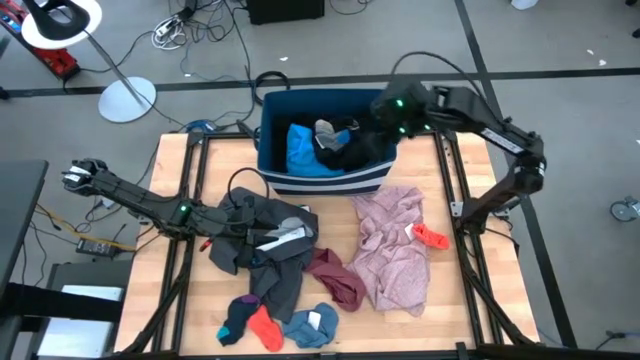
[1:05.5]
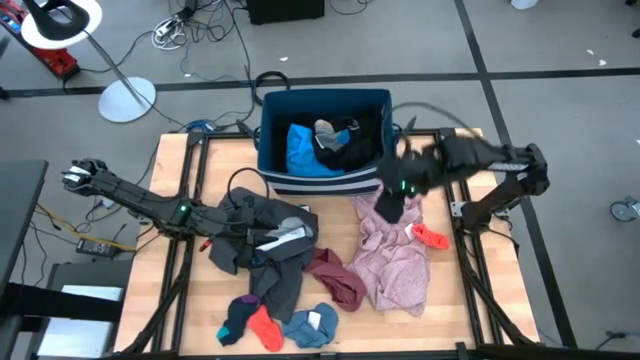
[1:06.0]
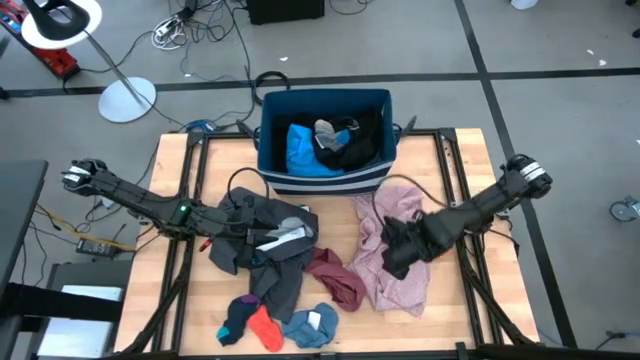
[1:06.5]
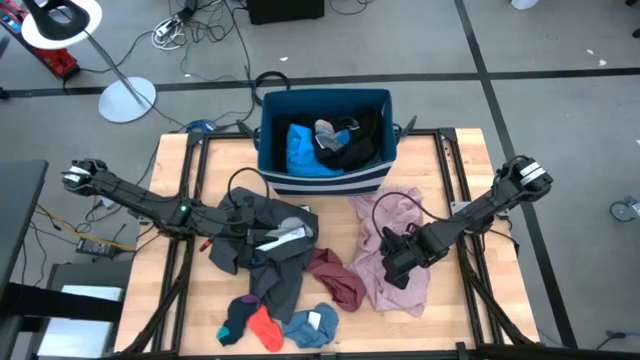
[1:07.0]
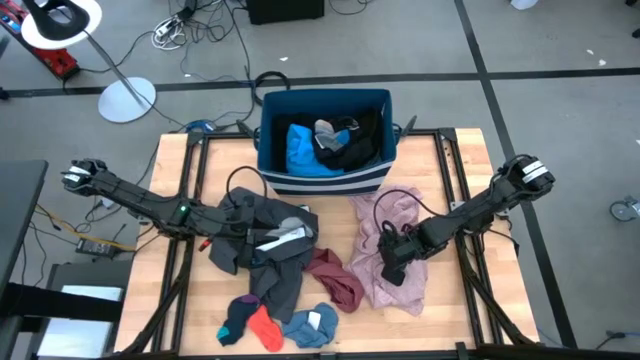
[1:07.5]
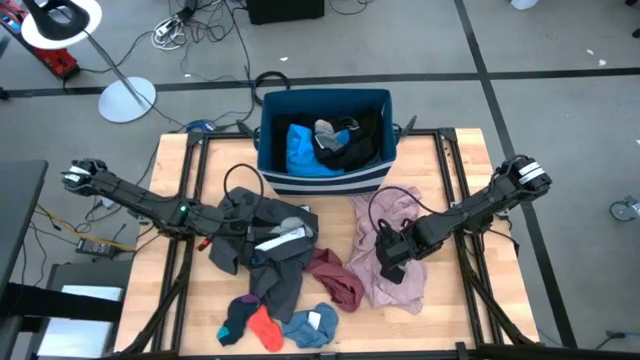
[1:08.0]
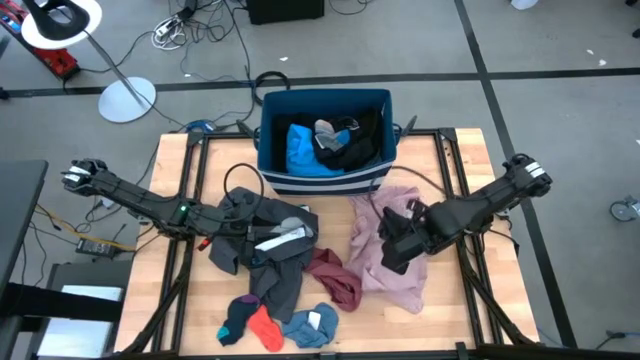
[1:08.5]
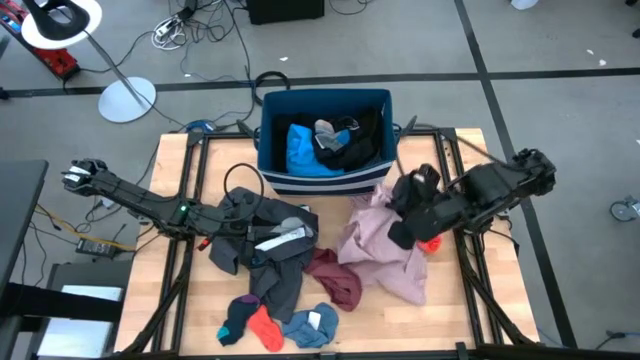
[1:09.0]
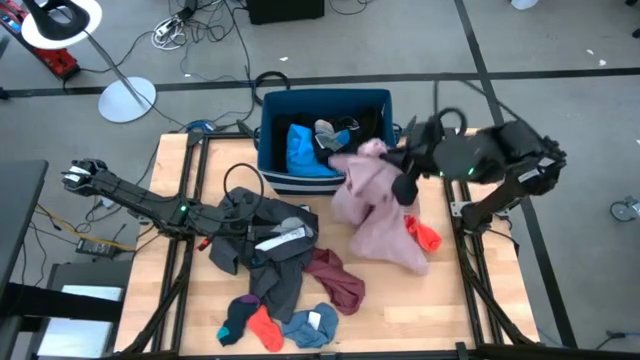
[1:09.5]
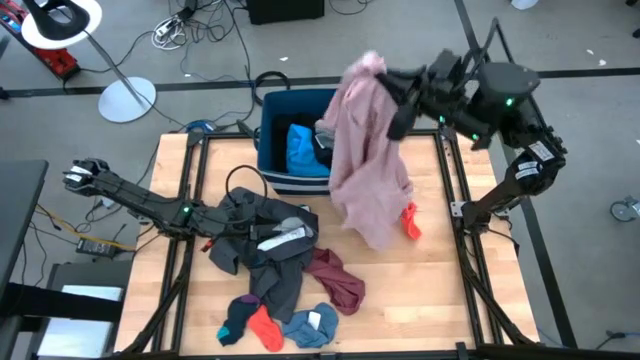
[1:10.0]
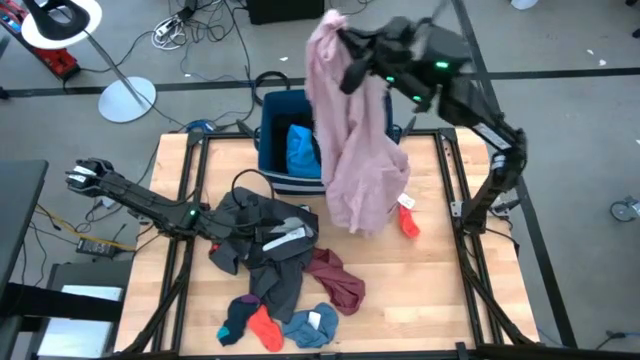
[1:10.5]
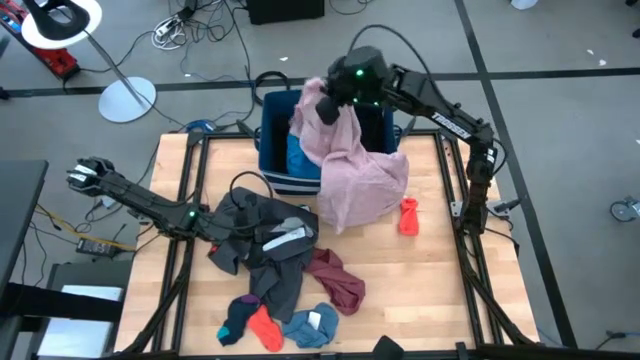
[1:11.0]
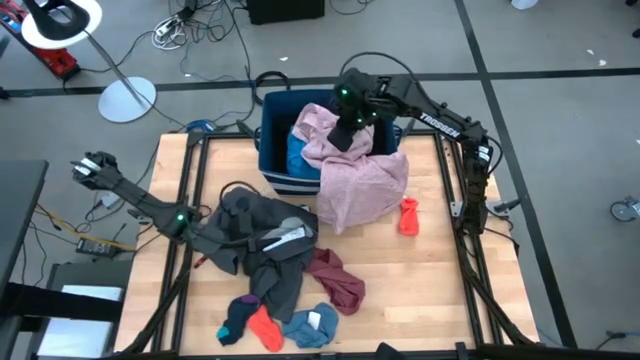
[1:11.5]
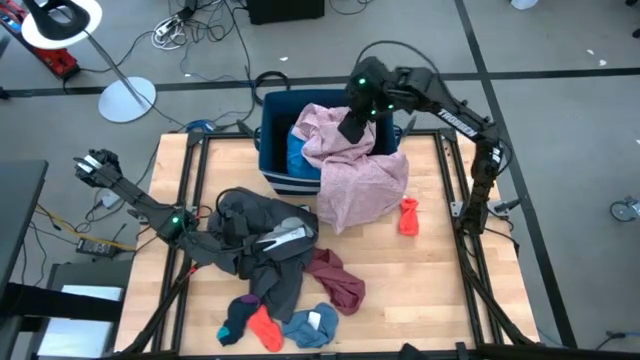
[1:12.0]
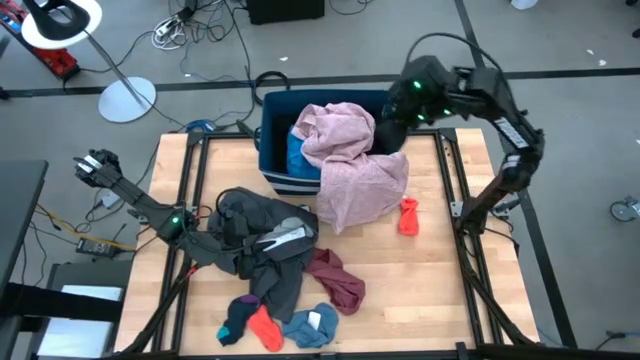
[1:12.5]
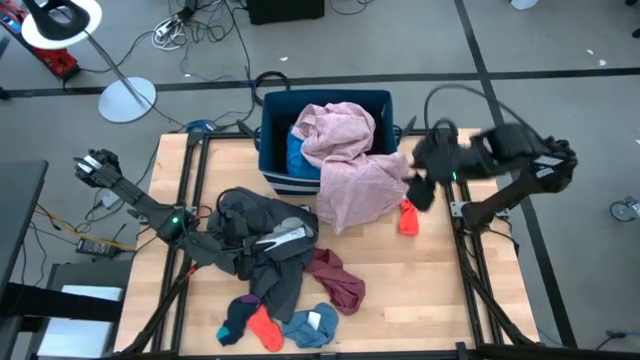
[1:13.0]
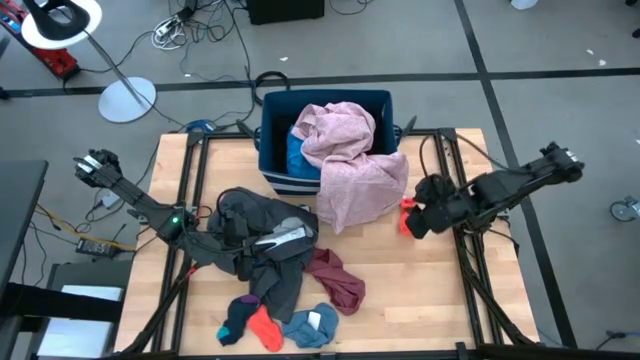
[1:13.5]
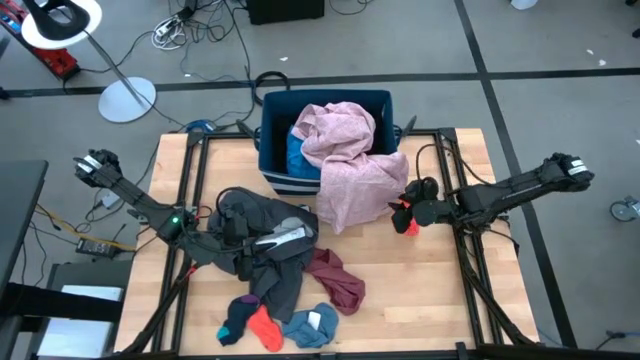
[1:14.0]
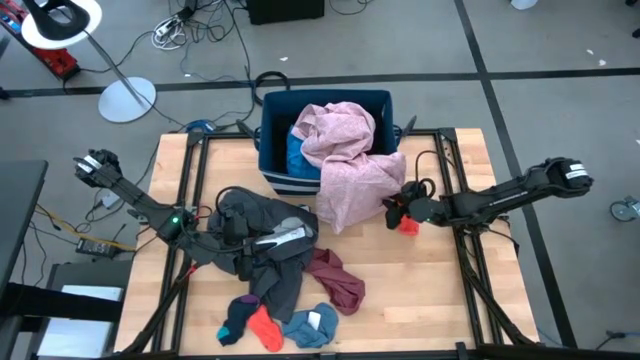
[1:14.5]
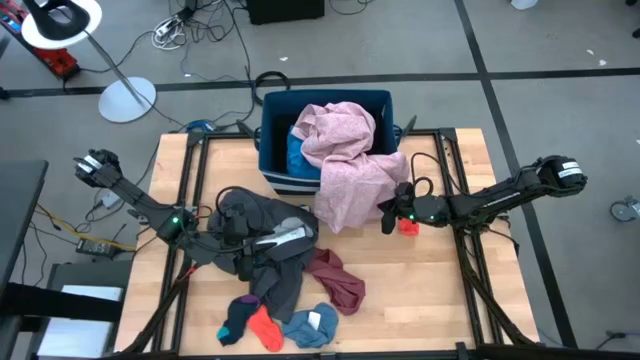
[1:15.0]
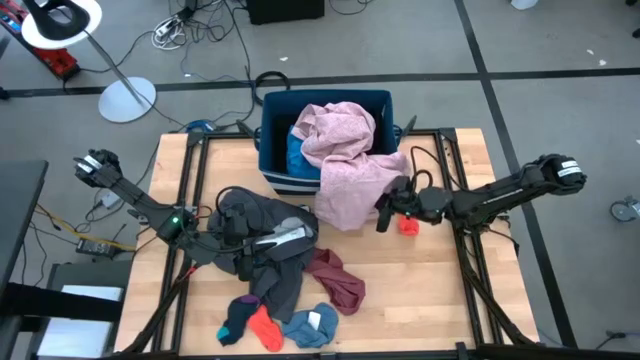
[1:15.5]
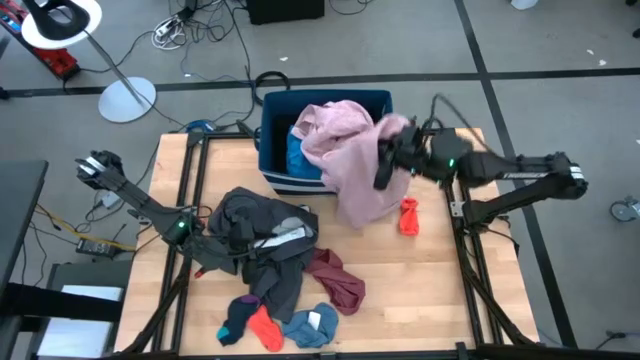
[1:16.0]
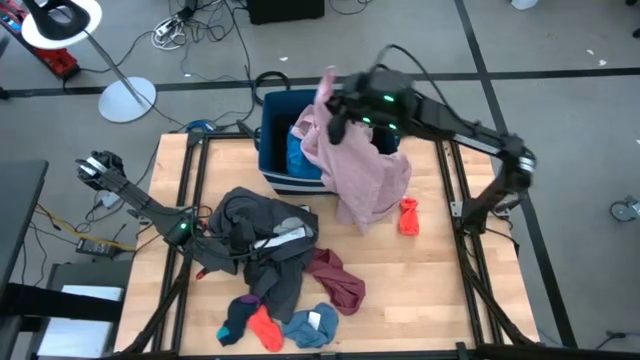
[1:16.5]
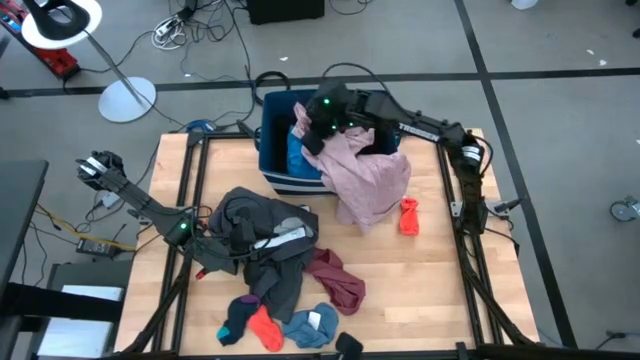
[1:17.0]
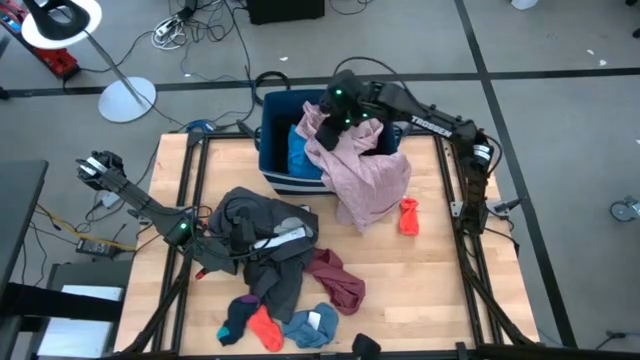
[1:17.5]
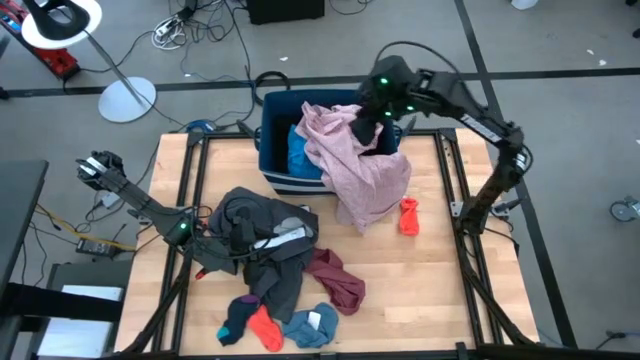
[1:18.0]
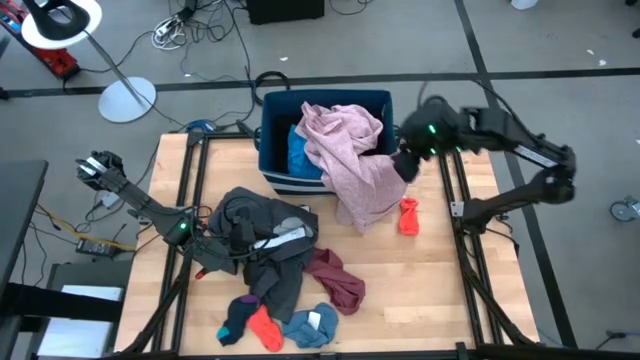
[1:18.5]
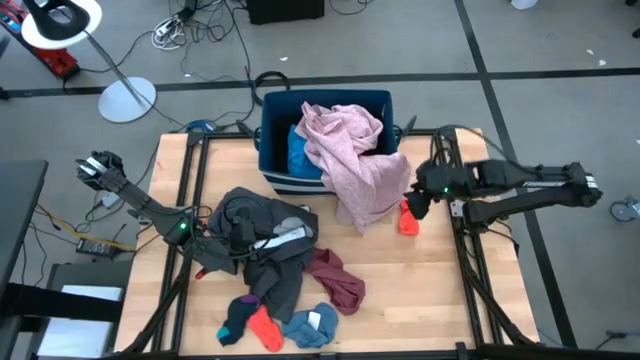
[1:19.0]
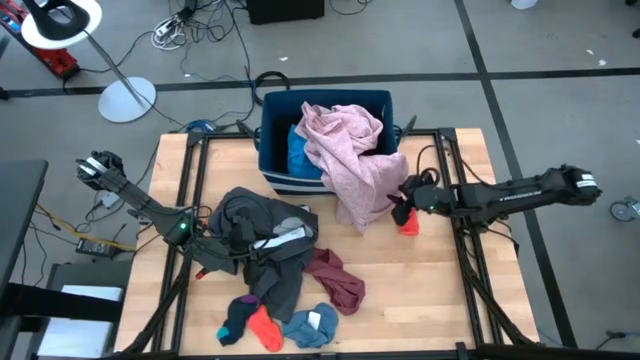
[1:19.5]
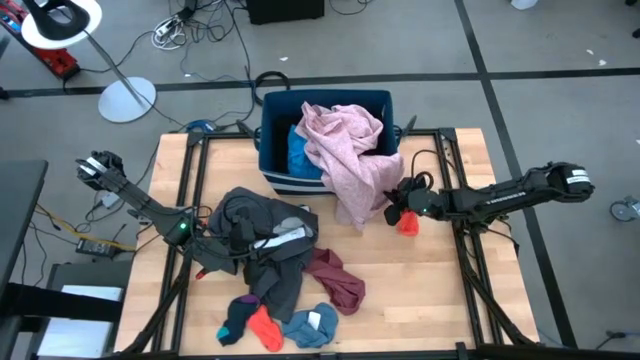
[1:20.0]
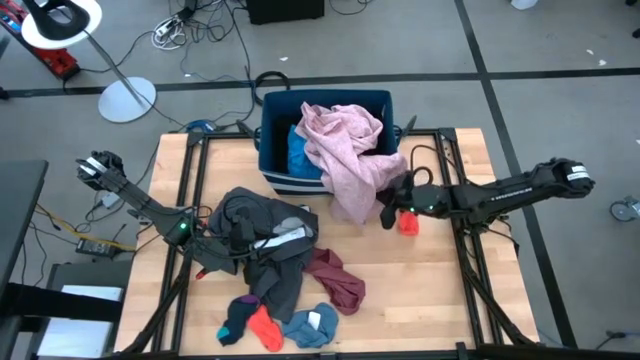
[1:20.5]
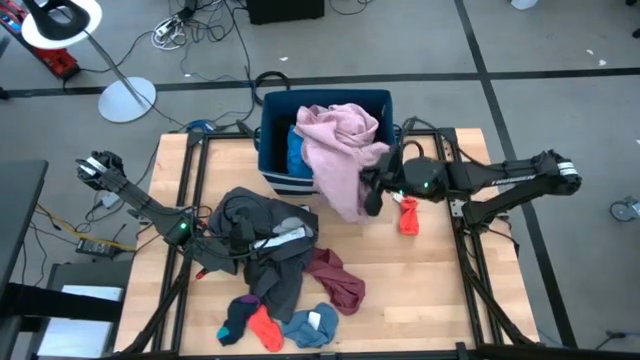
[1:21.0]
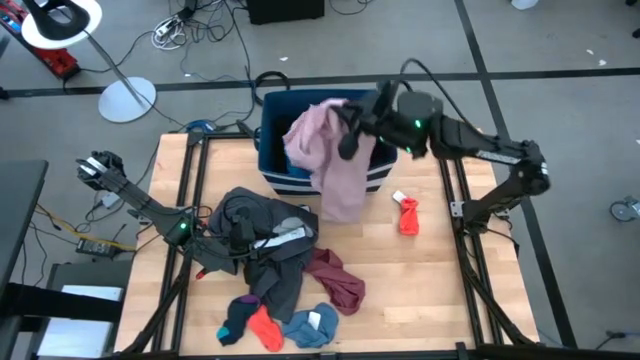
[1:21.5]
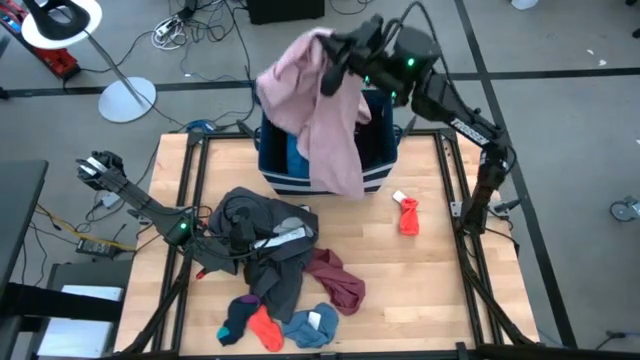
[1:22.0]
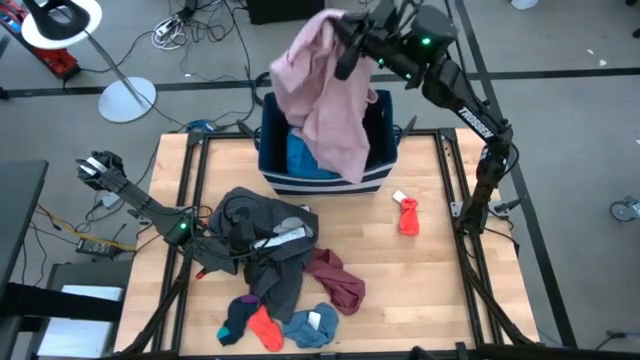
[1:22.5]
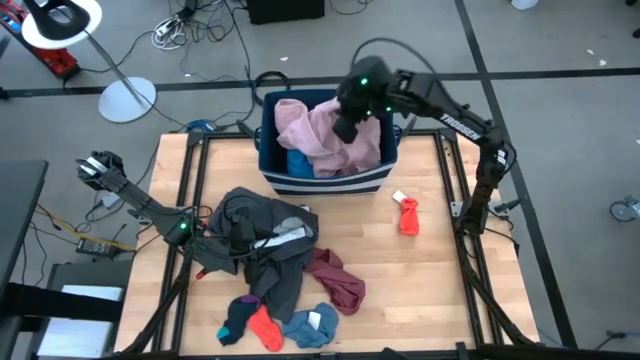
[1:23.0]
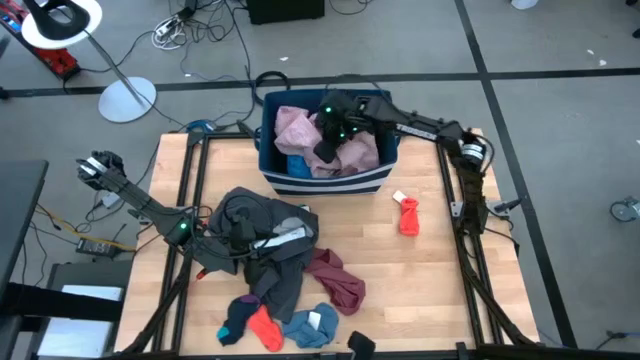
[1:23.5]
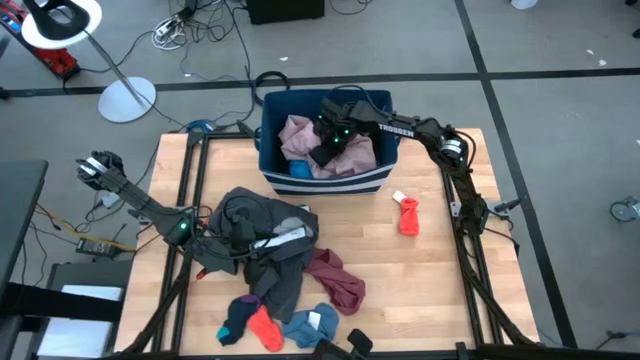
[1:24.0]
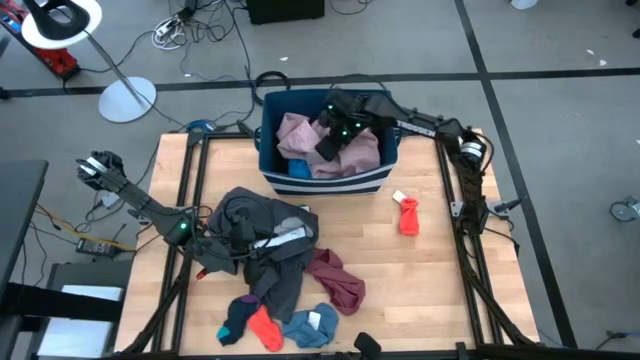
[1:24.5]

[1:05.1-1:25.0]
Task: Sort clothes
Put the pink polo into the laundry bin

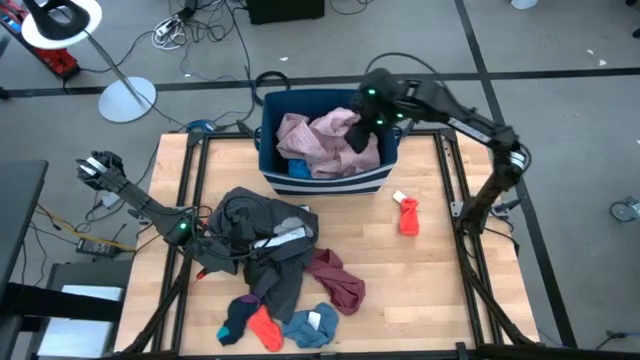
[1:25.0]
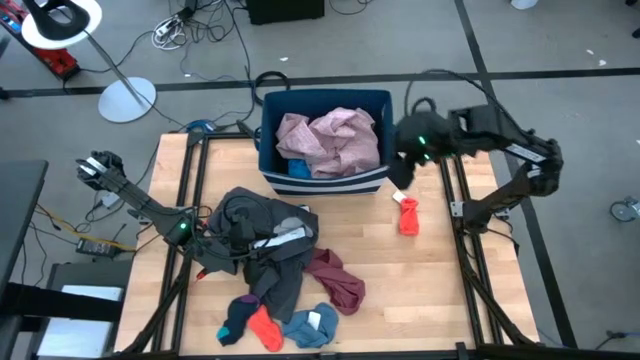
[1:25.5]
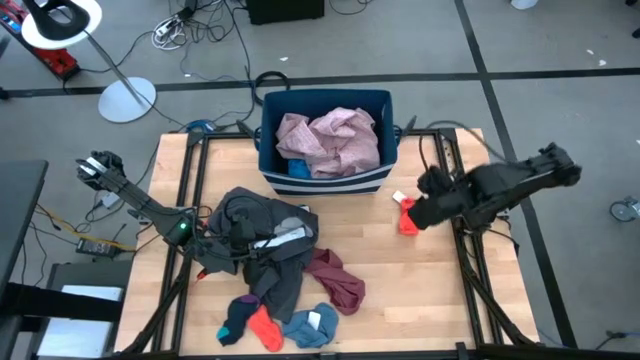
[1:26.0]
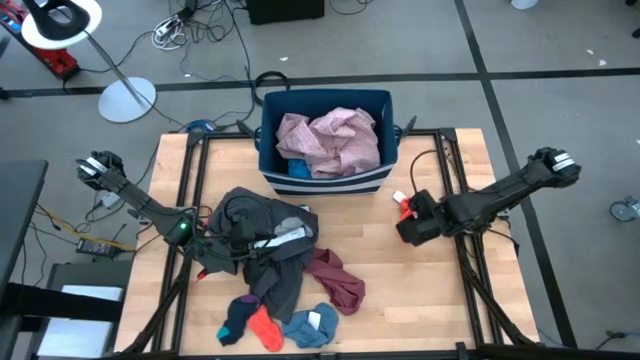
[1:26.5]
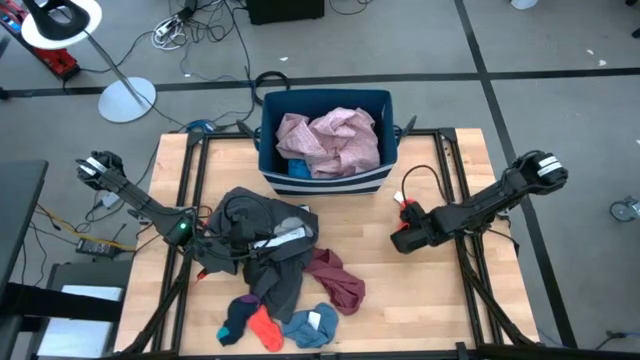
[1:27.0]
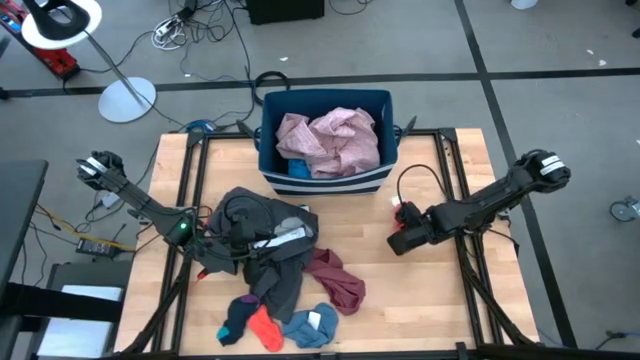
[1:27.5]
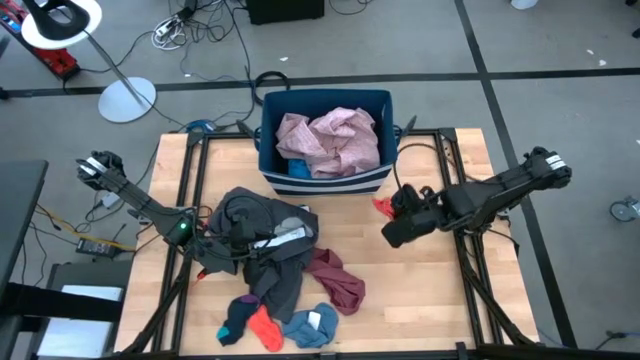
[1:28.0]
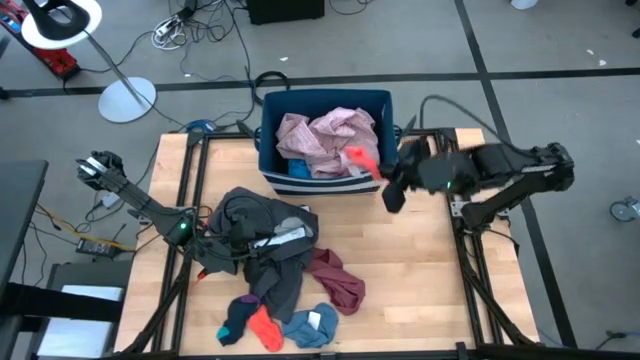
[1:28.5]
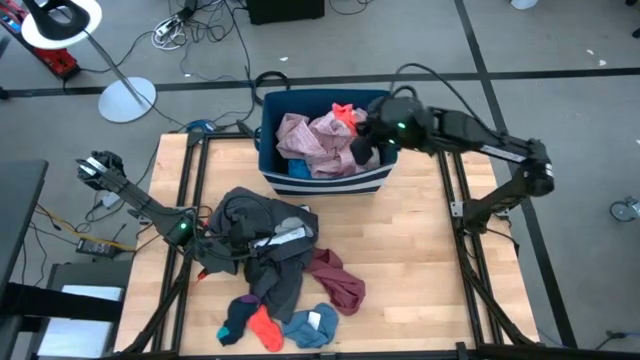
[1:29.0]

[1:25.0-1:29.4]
Put the right orange sock into the laundry bin
